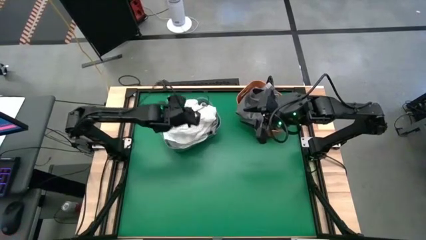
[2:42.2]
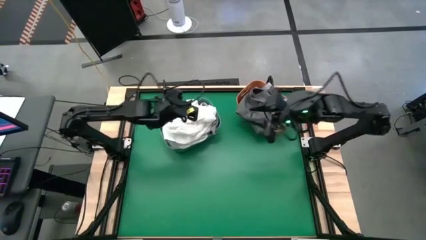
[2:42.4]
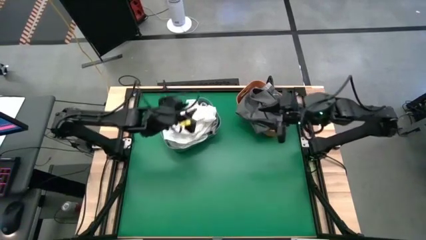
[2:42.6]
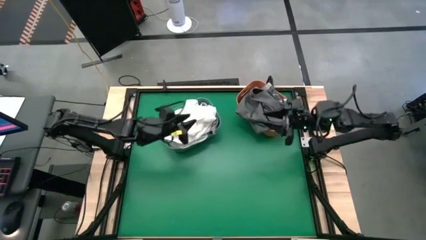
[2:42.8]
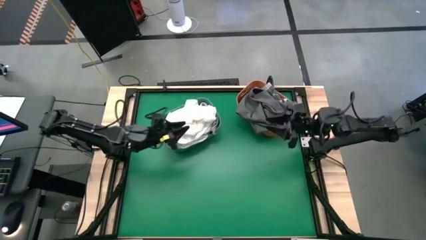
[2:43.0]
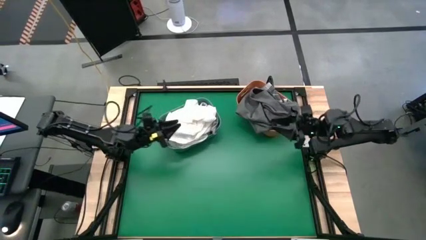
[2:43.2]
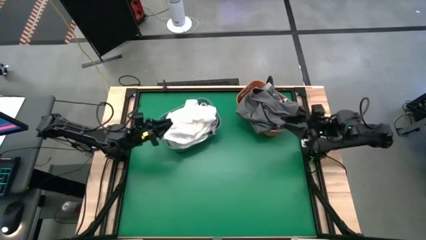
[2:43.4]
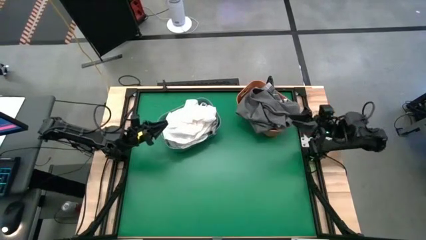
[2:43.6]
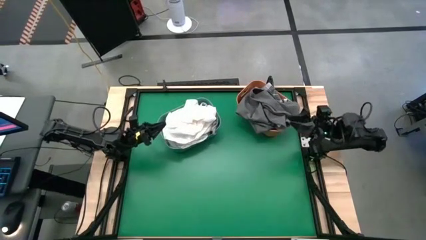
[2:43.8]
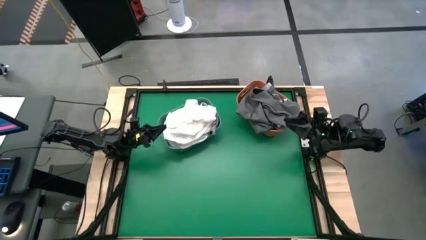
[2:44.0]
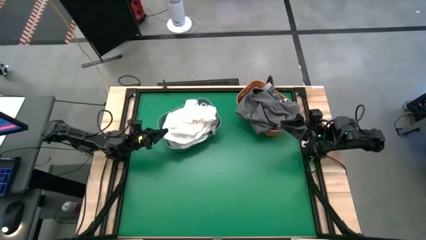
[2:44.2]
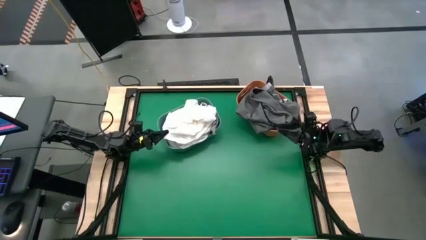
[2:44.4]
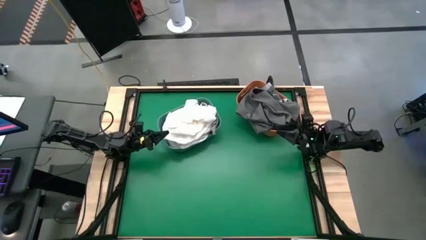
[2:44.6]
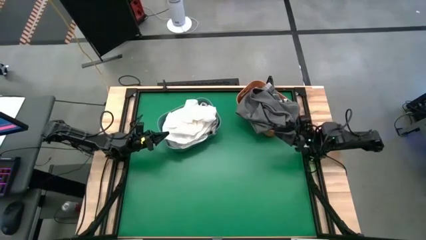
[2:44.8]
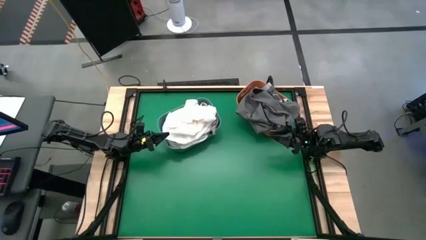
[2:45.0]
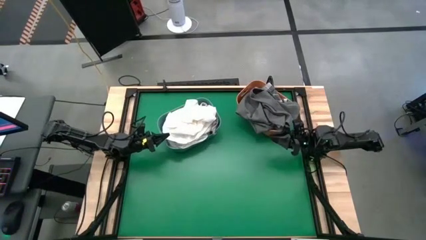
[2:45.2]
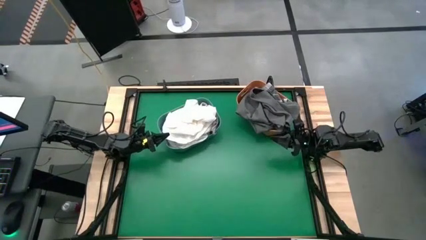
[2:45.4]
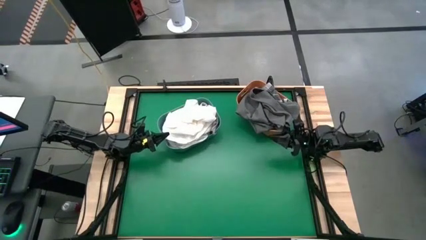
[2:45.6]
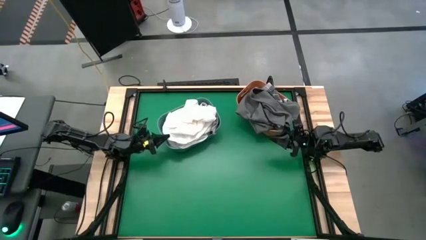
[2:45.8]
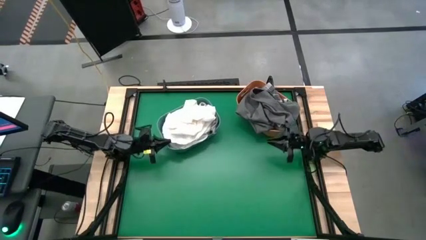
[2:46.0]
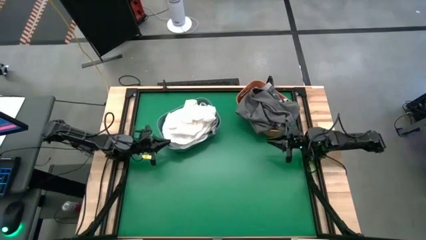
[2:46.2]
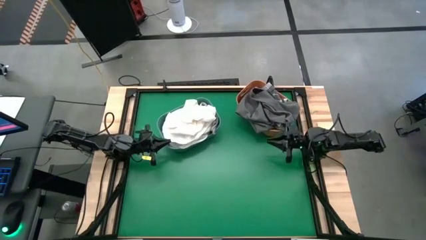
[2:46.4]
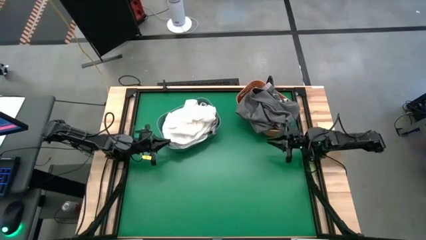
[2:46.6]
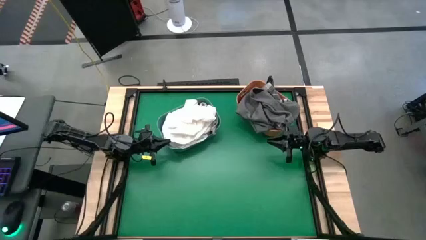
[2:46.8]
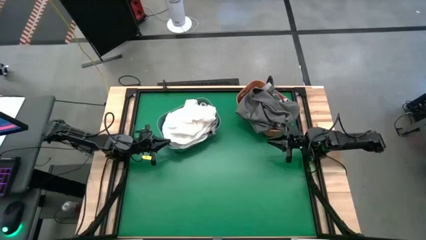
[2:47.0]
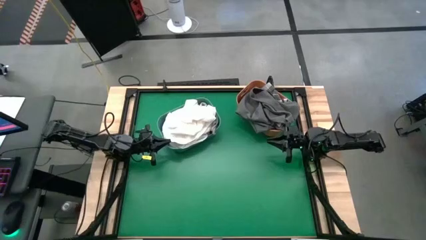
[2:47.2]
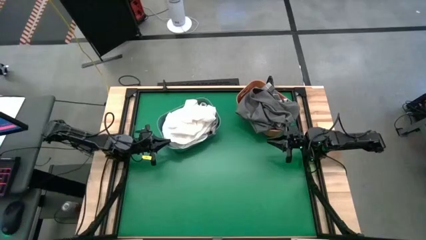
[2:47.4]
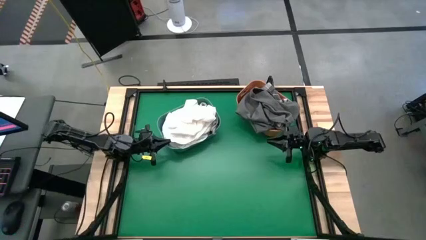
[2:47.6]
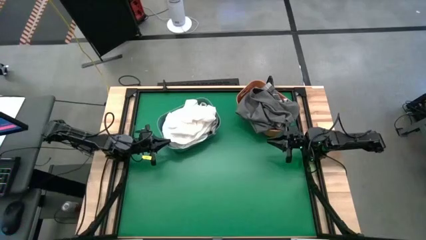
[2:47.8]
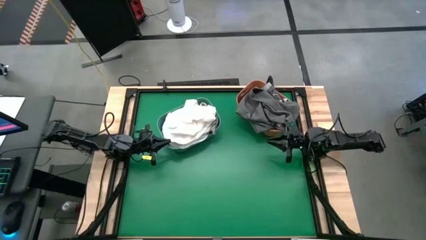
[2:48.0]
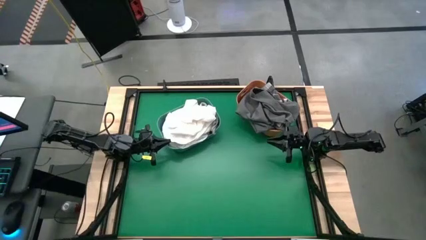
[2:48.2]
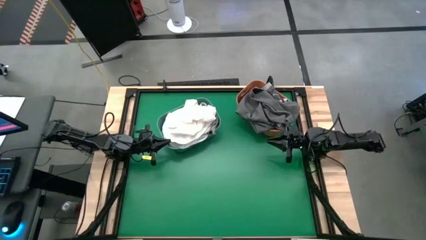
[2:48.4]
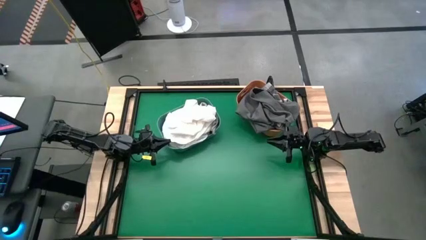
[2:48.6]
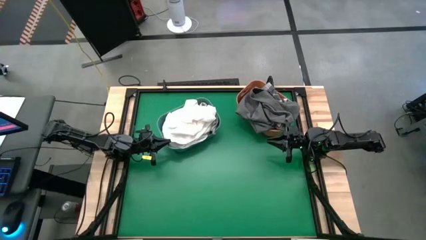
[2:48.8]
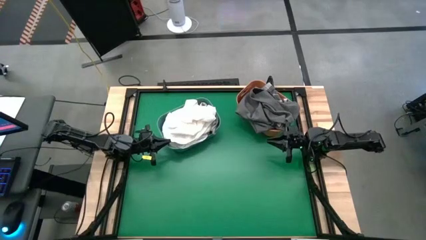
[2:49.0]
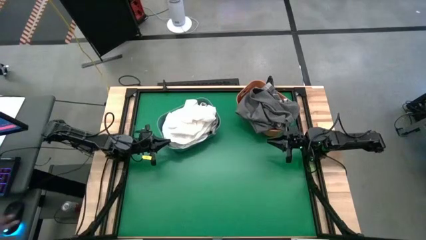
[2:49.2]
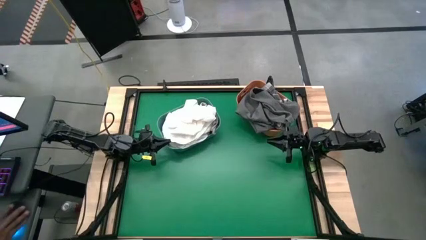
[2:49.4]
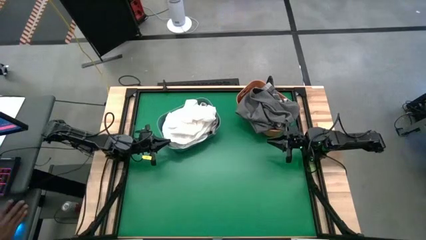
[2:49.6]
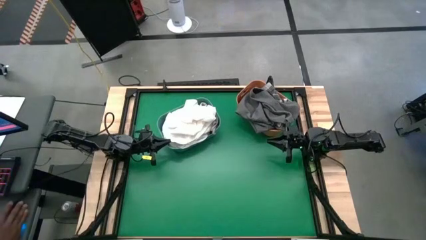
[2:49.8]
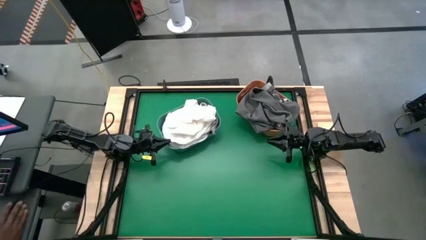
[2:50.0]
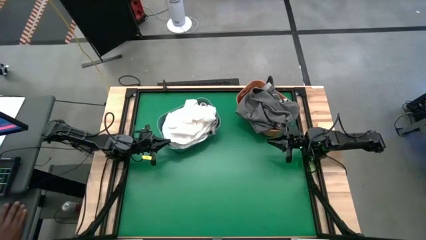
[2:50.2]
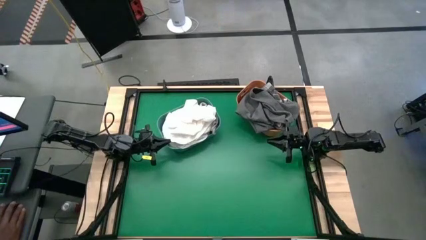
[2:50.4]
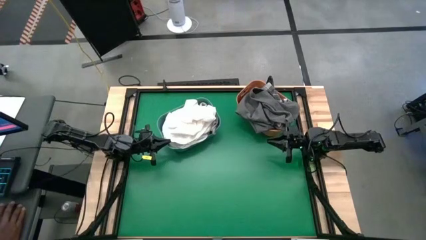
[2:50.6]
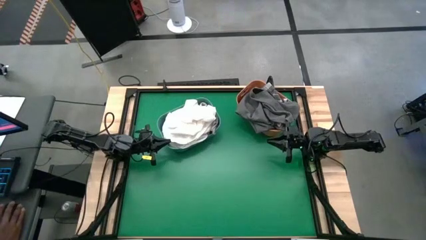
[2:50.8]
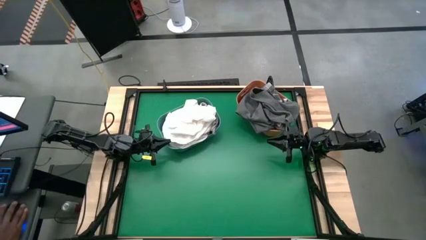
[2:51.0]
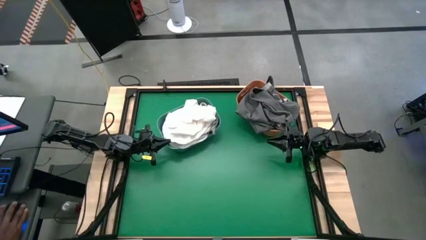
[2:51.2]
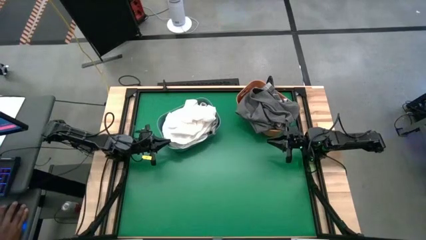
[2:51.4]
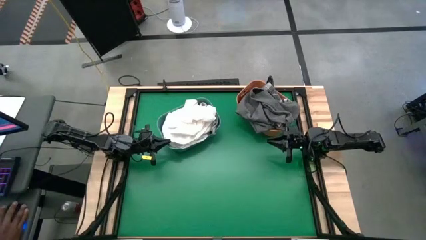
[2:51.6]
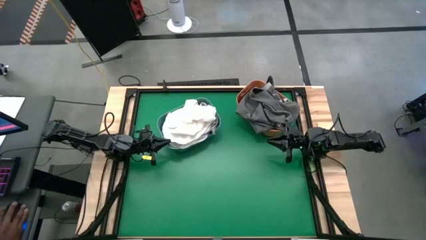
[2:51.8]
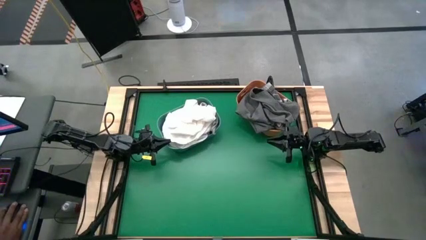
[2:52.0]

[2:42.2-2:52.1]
Task: Sort towels by color in basket
Return to Home Position

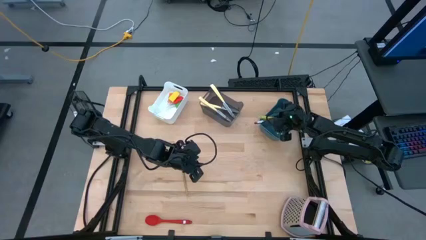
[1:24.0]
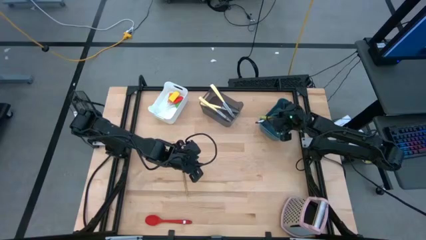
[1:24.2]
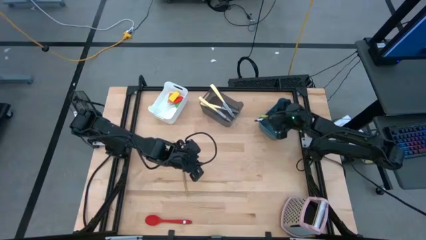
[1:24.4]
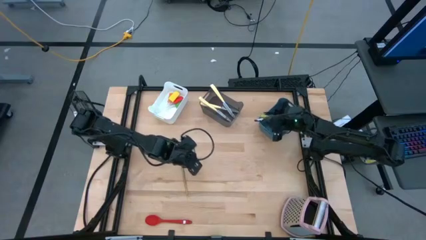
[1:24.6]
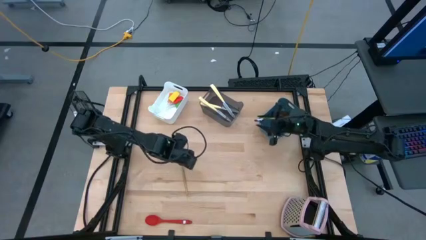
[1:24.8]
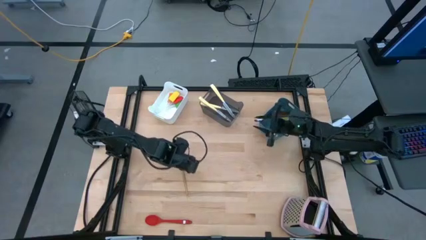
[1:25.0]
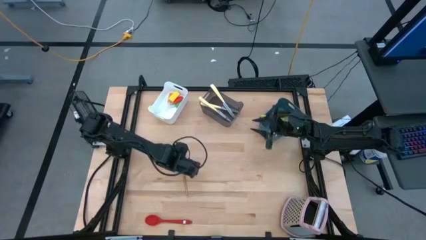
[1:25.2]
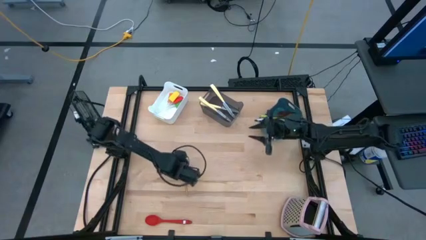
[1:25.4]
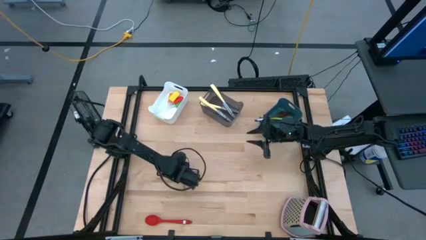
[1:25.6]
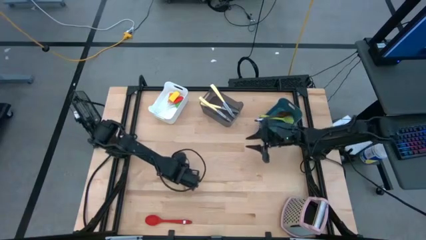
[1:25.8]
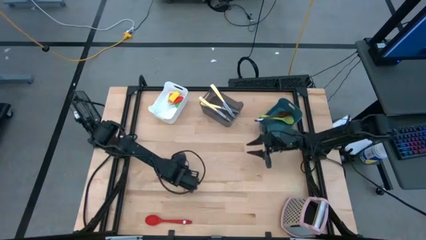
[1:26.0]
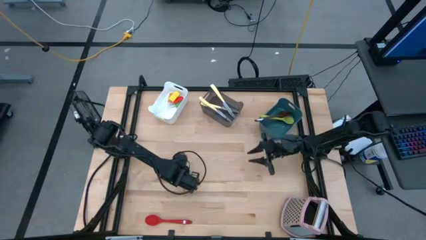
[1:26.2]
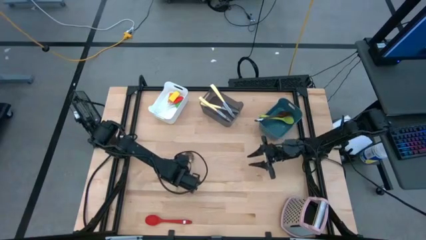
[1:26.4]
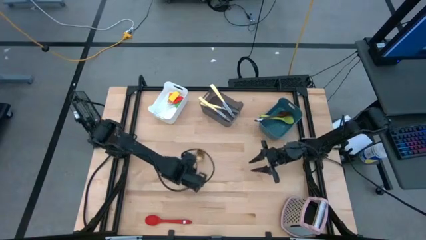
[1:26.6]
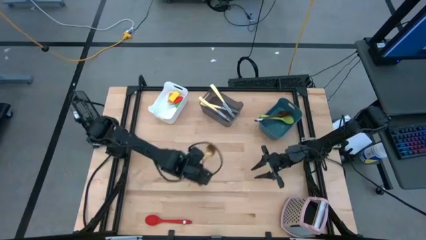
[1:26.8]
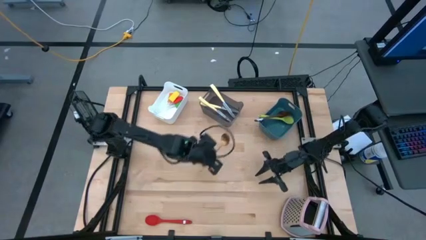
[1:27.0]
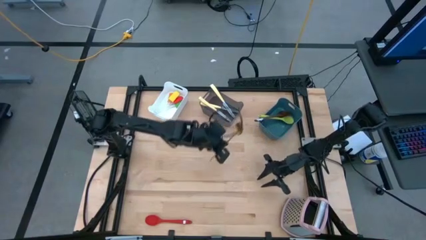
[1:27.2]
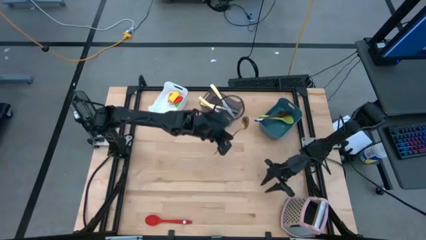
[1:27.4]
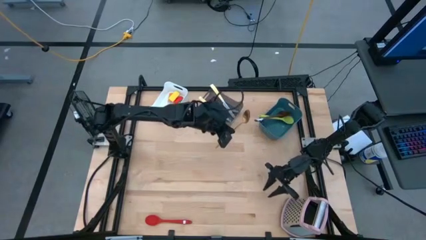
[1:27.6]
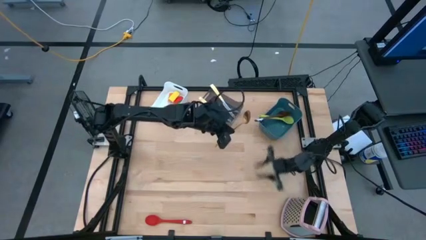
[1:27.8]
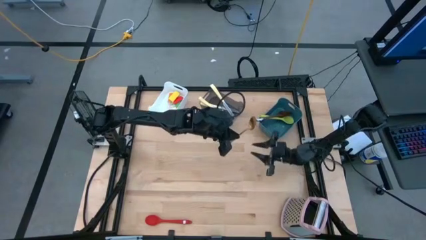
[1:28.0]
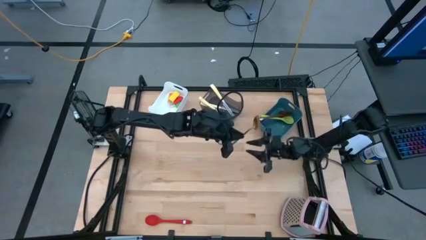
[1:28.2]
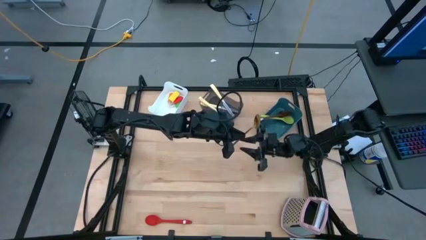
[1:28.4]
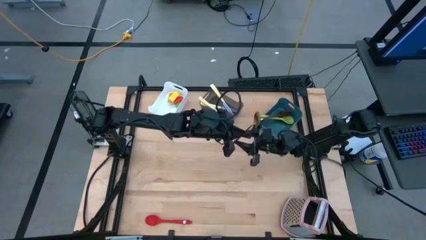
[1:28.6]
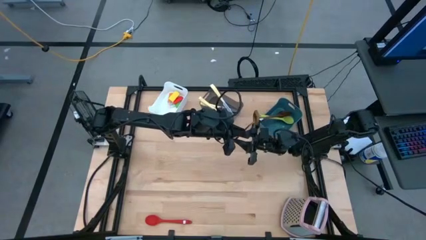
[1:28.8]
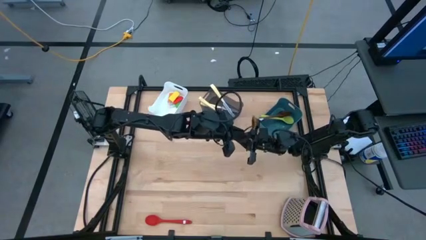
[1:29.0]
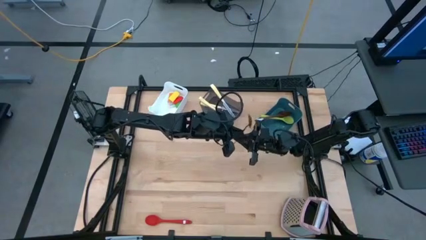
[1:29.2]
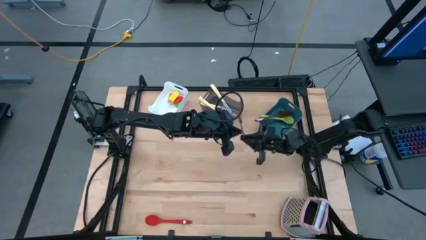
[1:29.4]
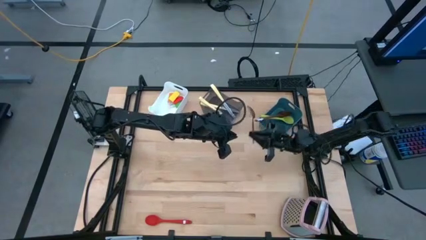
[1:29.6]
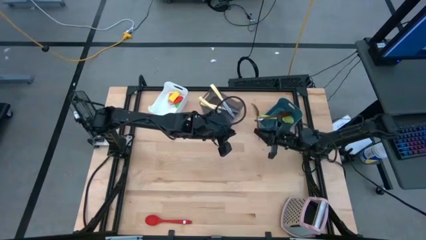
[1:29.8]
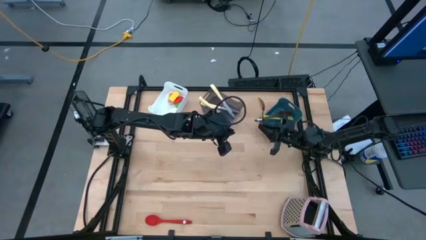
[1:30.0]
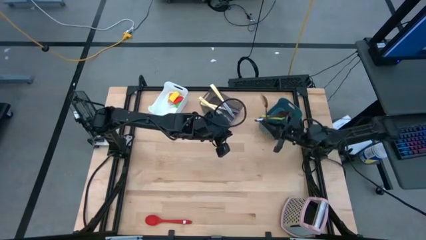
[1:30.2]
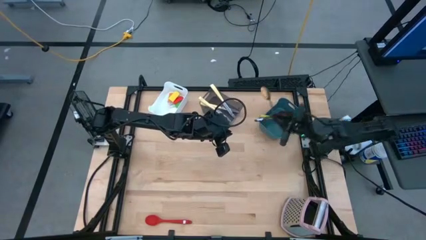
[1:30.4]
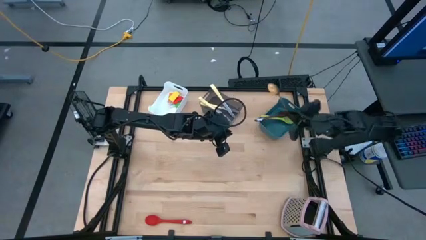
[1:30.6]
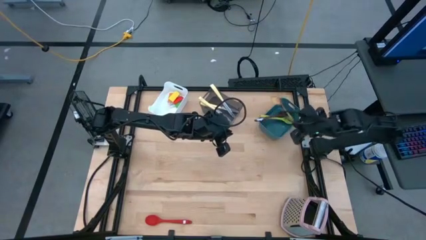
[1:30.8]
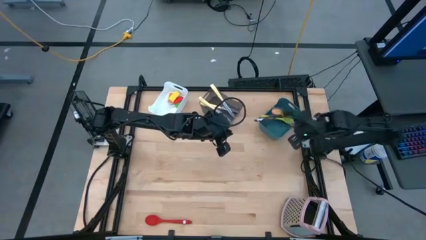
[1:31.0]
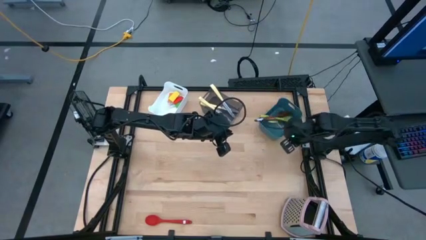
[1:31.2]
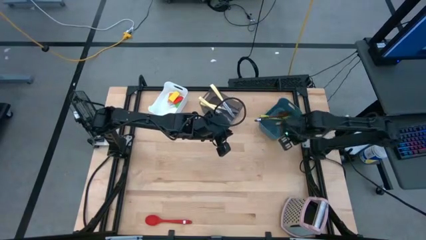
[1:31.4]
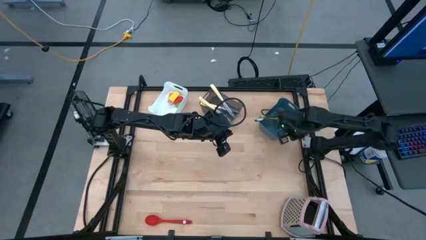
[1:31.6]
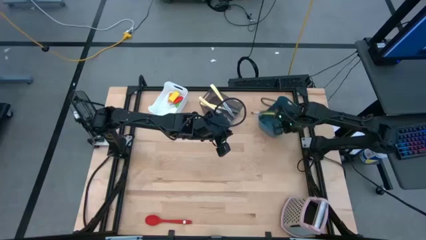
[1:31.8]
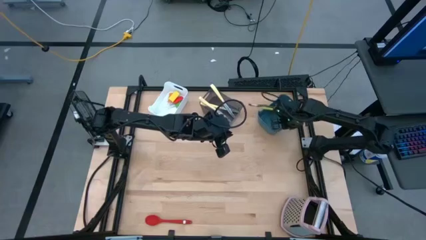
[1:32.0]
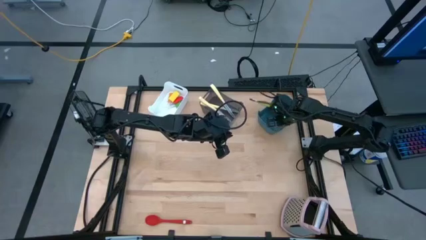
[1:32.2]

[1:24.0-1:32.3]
Task: Pick & Place Kitchen Items
Put the gold serving spoon into the blue bin
